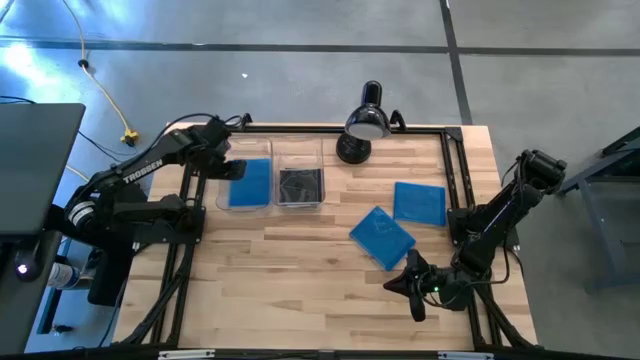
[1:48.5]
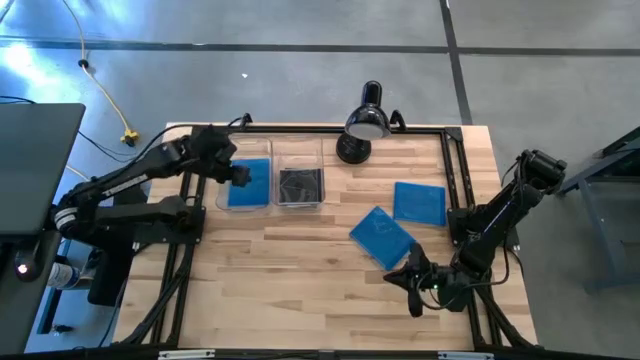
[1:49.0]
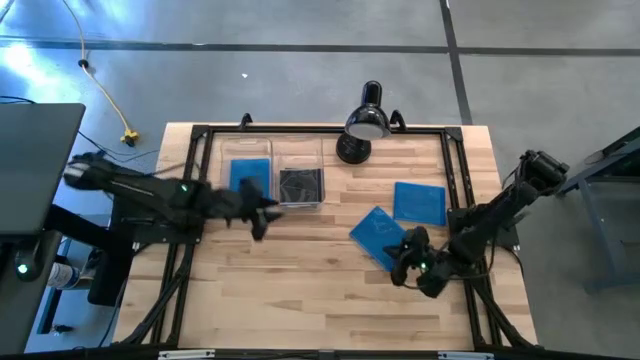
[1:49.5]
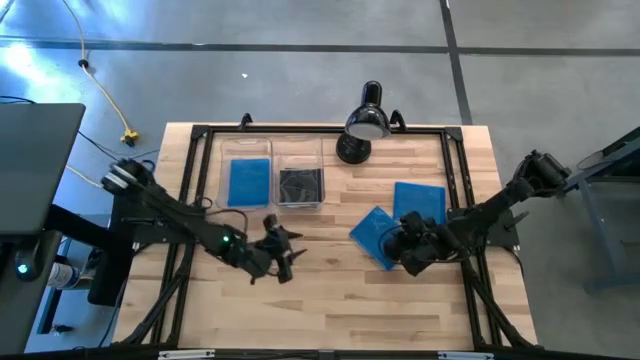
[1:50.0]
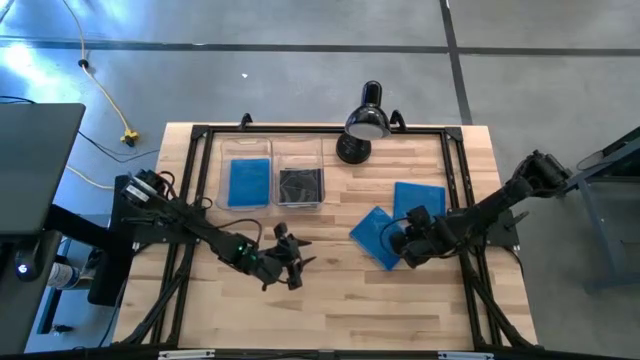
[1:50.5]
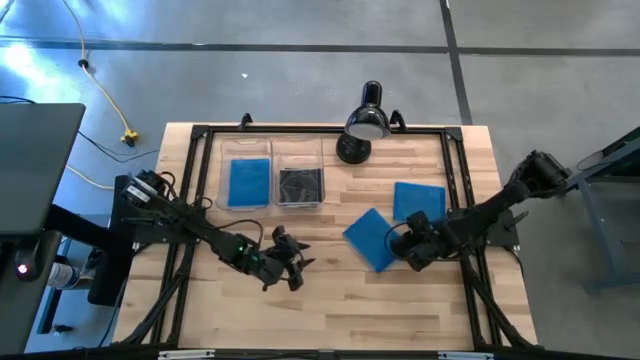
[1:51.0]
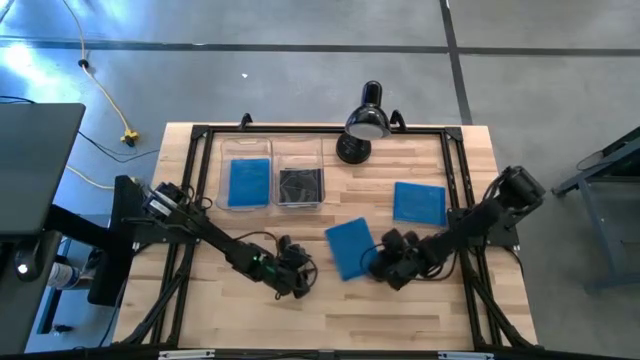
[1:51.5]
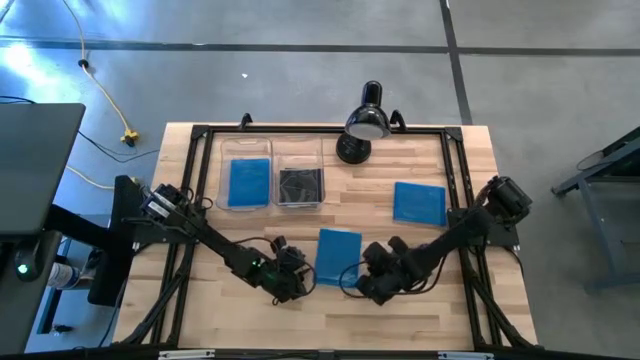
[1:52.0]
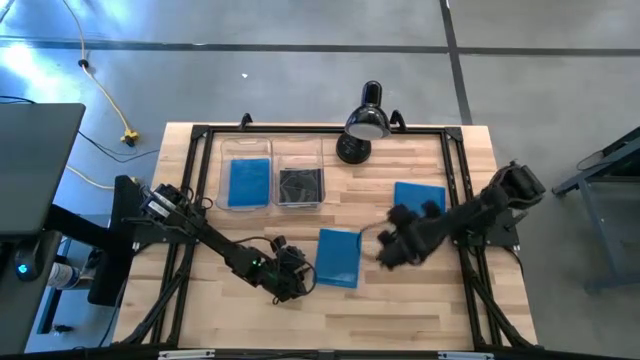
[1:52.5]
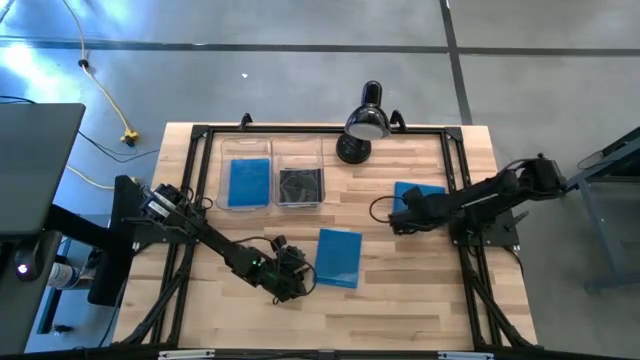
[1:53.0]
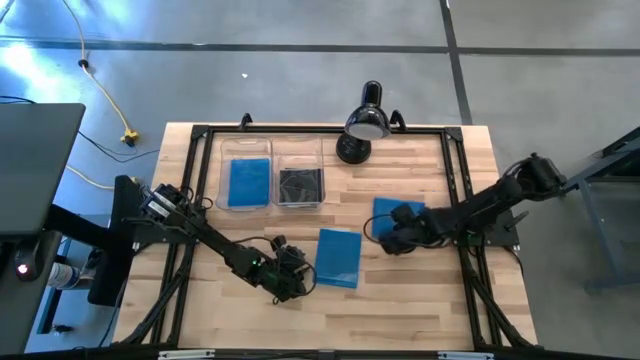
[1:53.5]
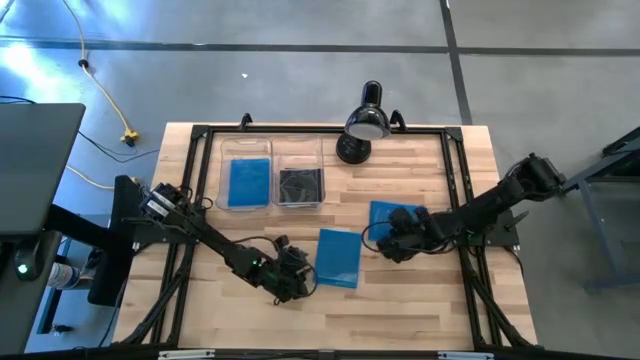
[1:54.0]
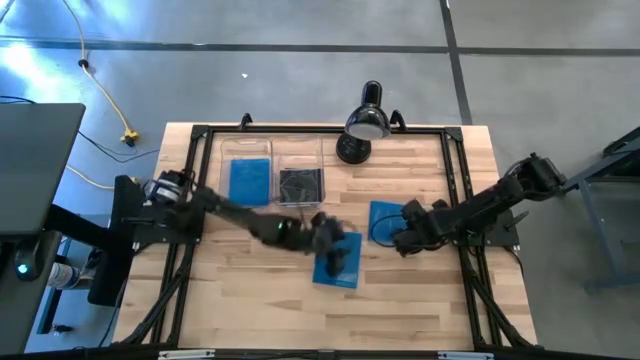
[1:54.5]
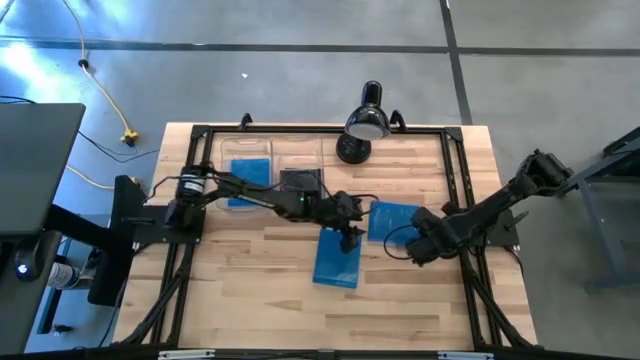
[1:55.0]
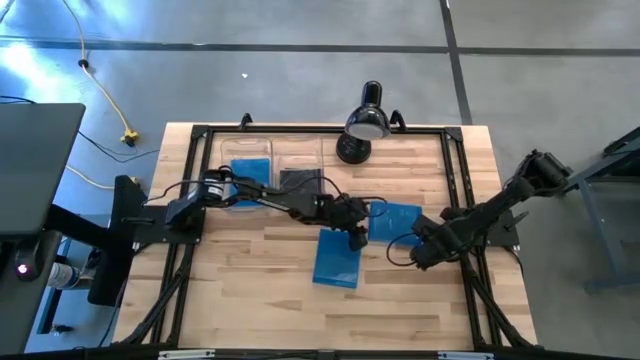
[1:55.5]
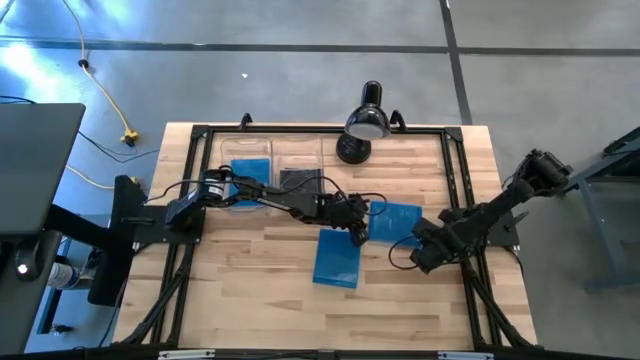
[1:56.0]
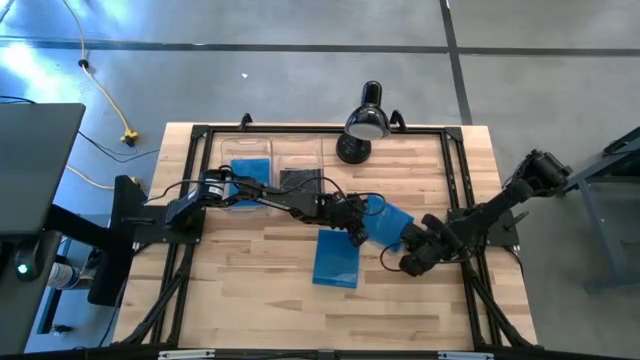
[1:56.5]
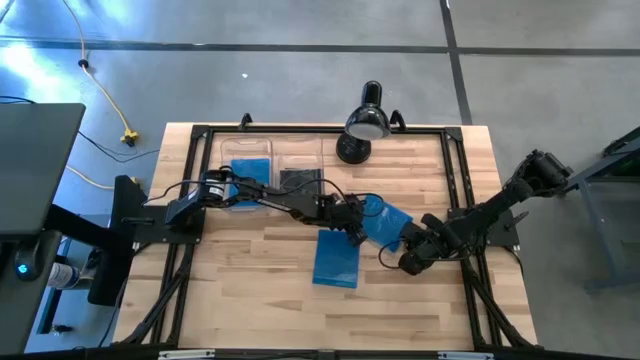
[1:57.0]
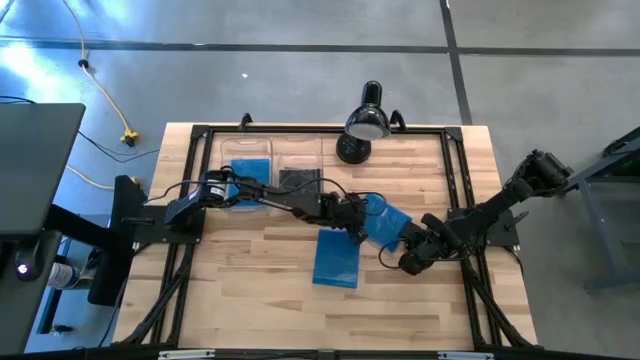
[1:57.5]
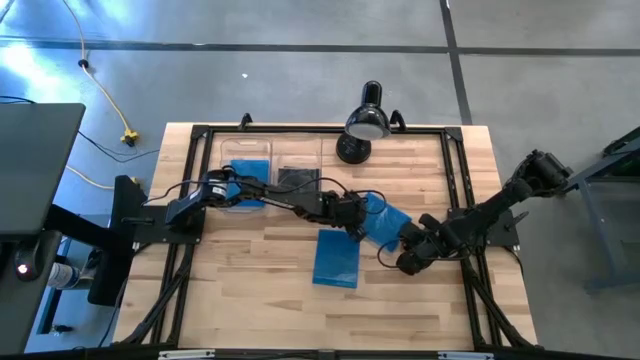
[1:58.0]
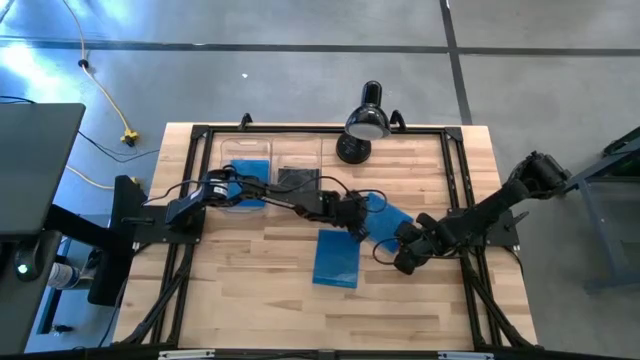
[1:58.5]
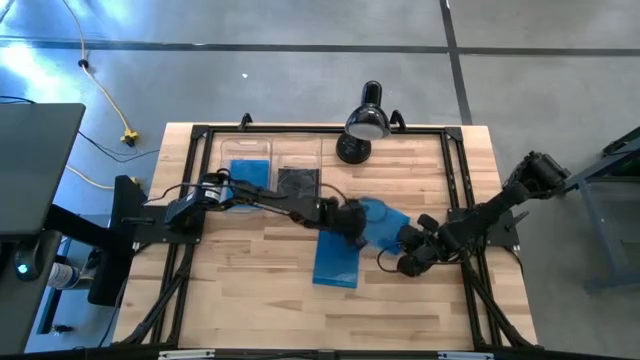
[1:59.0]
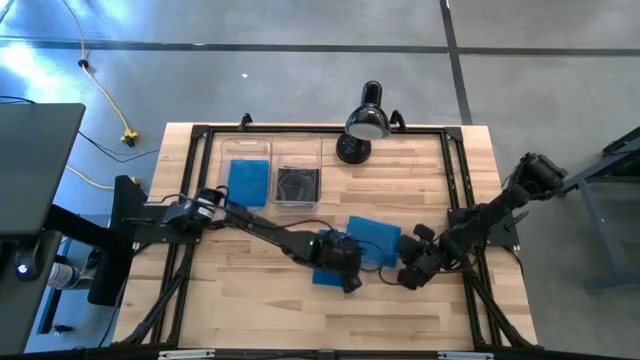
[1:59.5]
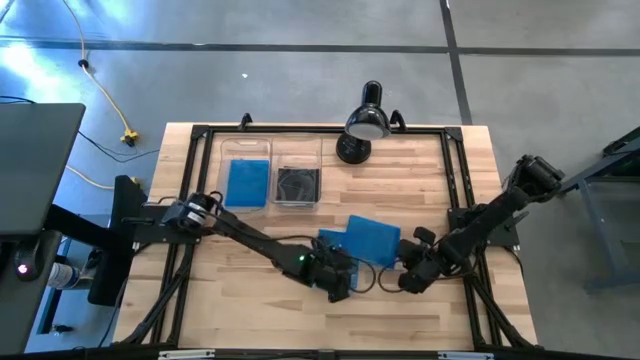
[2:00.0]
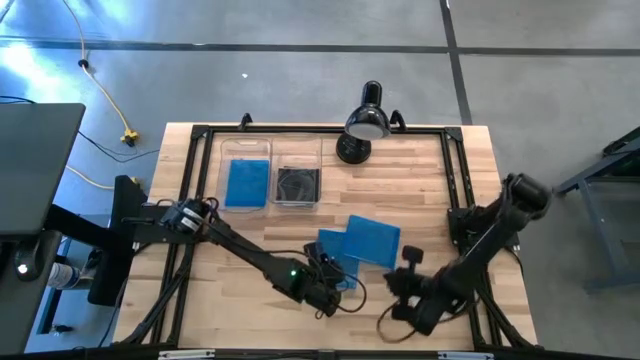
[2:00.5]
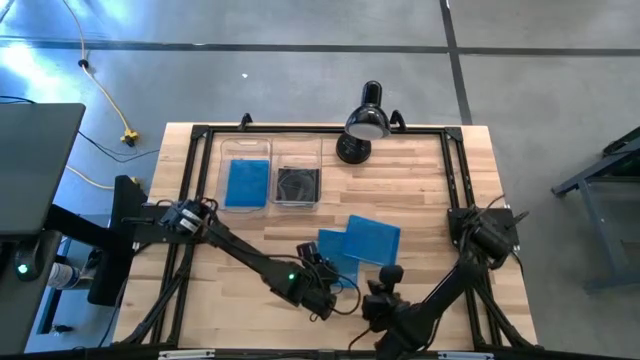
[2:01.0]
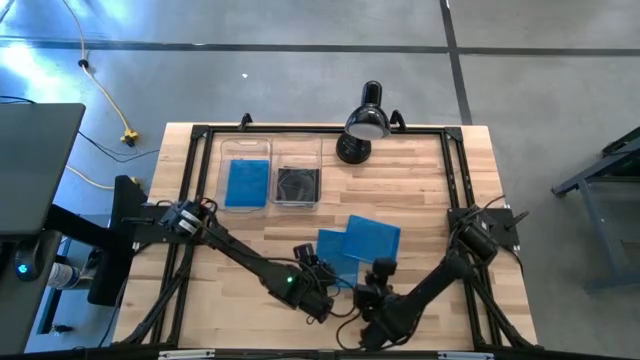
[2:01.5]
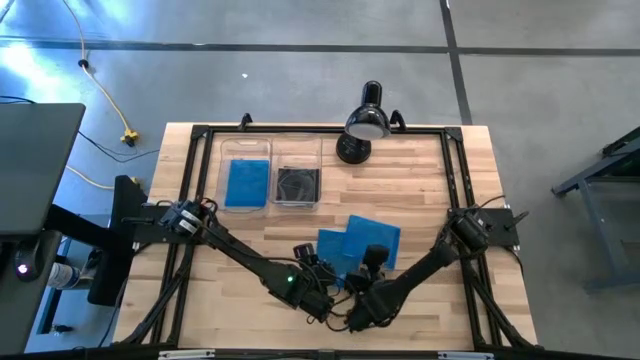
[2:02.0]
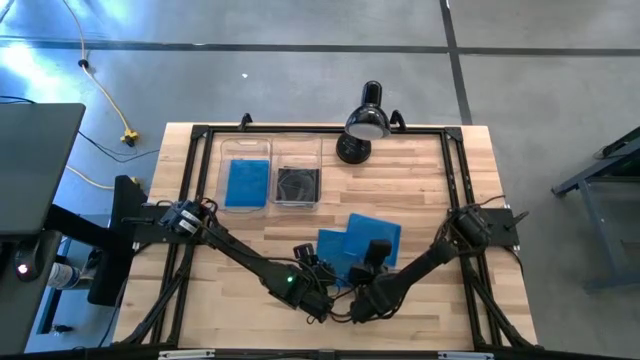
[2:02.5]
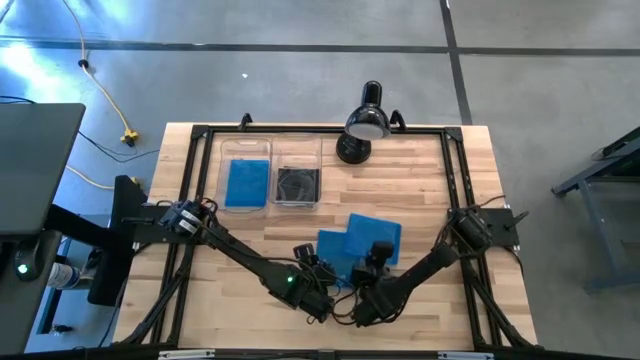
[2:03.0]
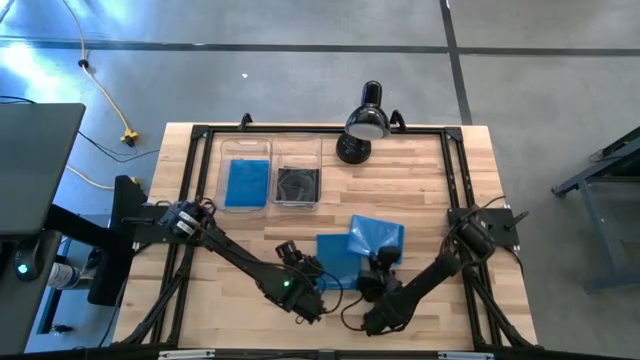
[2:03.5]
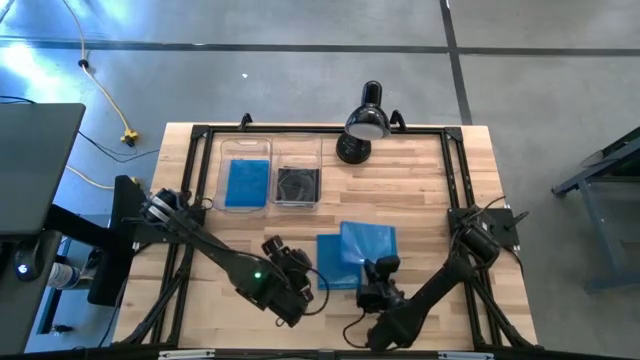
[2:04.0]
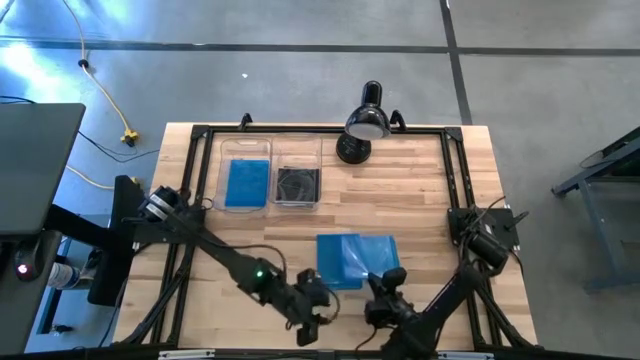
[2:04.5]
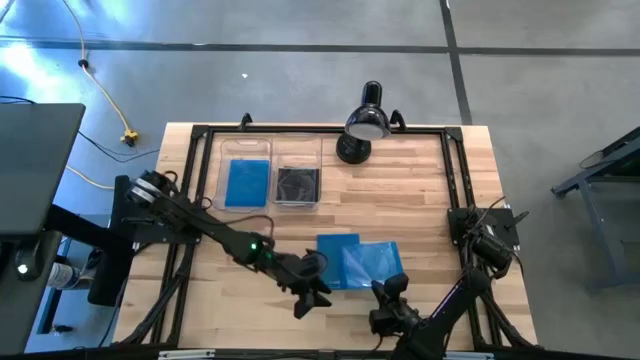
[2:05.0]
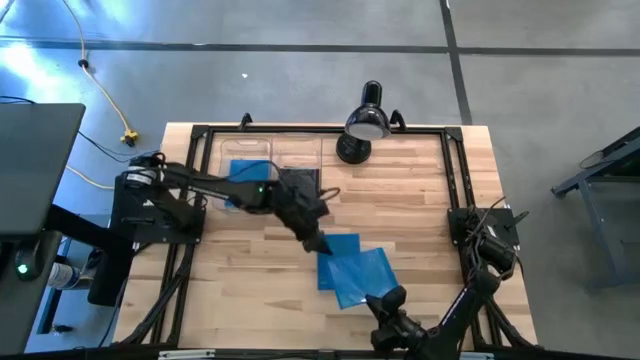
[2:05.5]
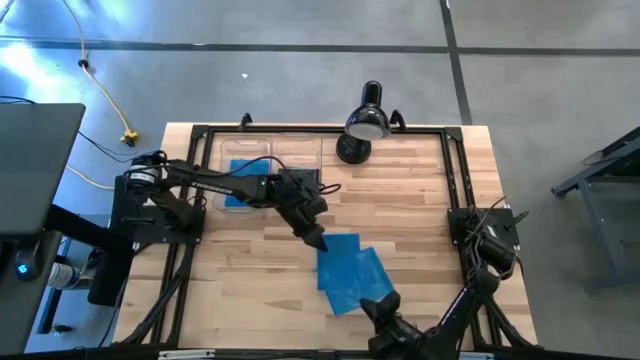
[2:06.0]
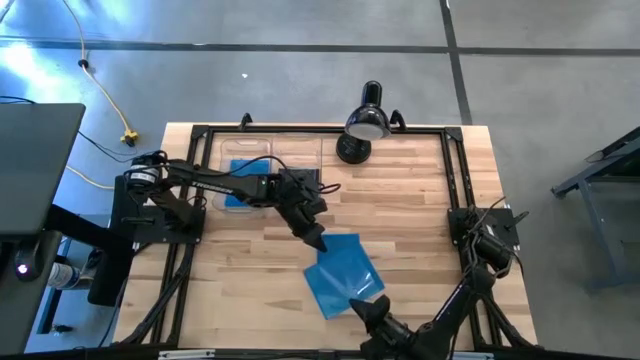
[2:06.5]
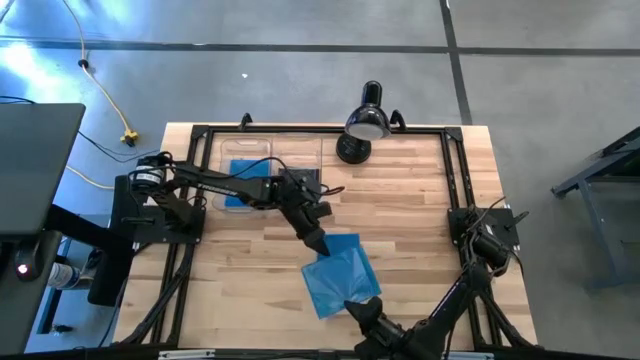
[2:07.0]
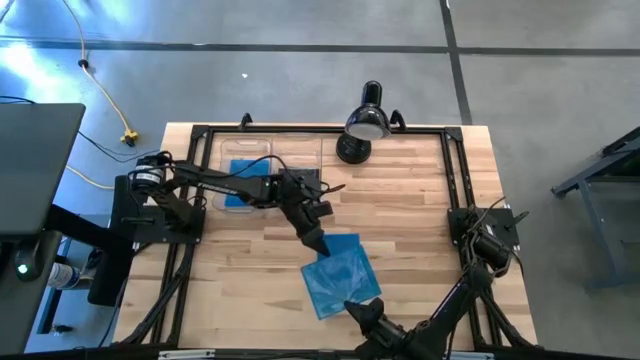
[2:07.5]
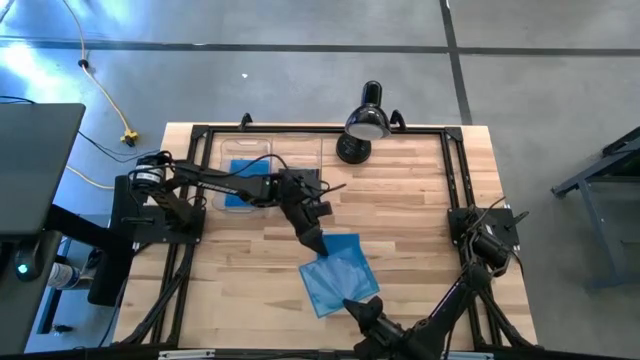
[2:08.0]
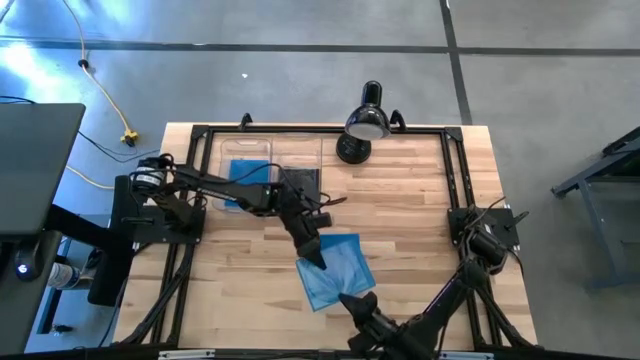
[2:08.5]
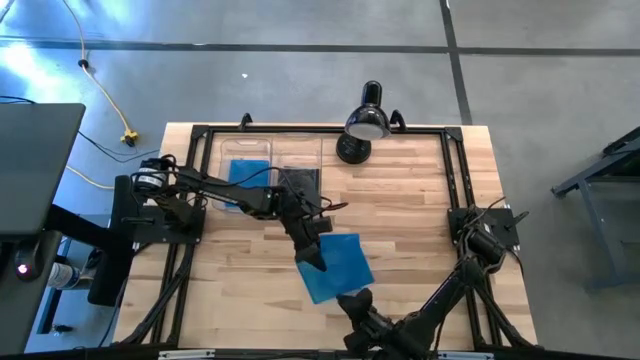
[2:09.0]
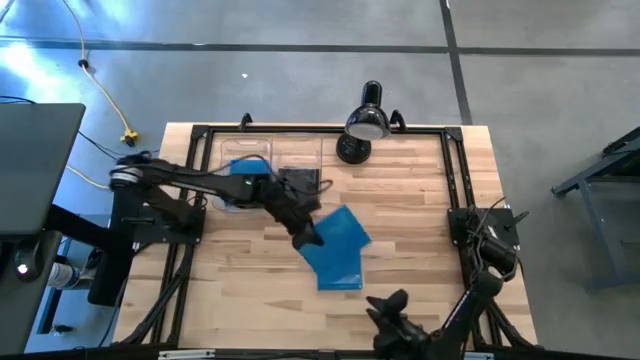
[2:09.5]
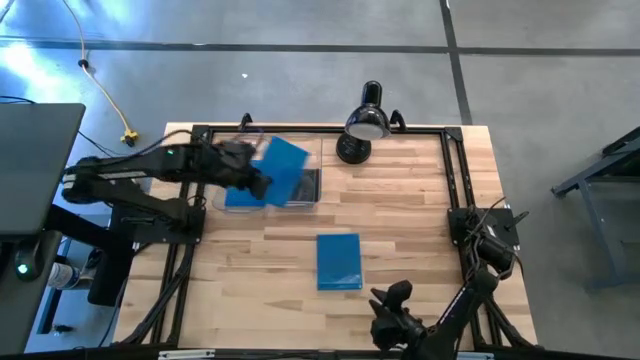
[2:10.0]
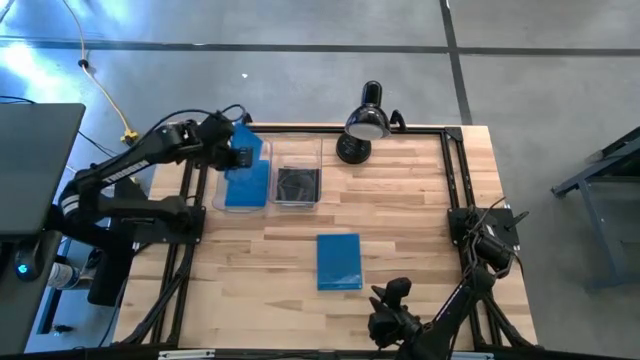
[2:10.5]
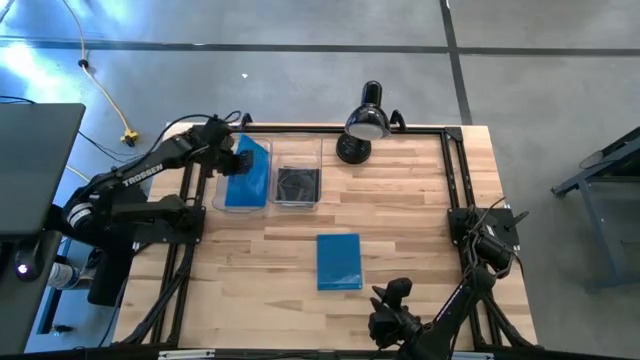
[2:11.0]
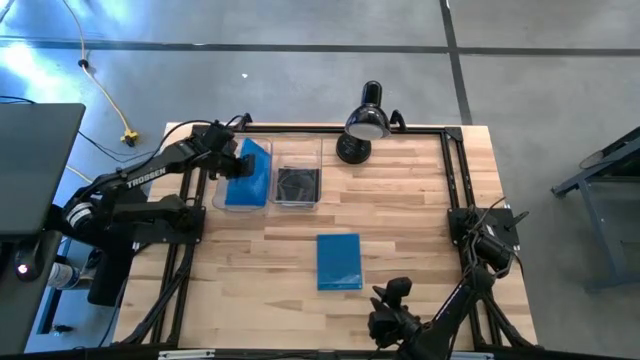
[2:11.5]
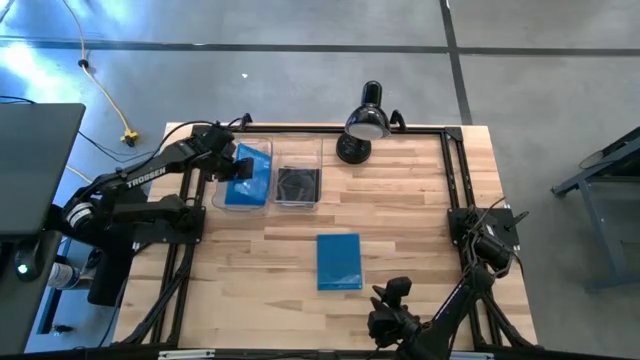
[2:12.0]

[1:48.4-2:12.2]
Task: Pick & place jewel cases by type
Put the top blue CD case into the left transparent bin
